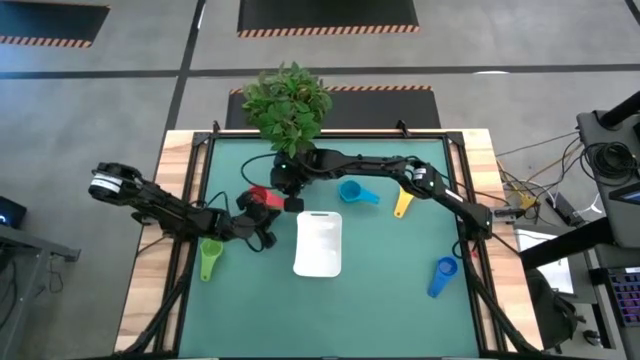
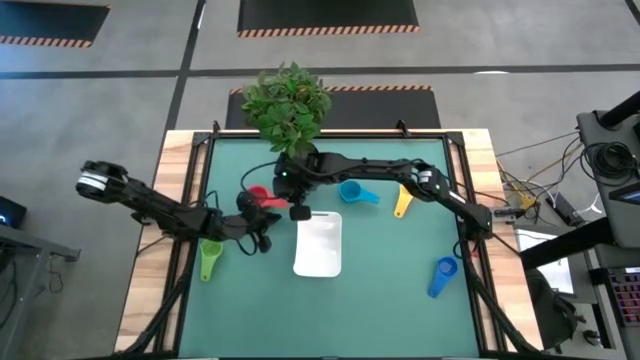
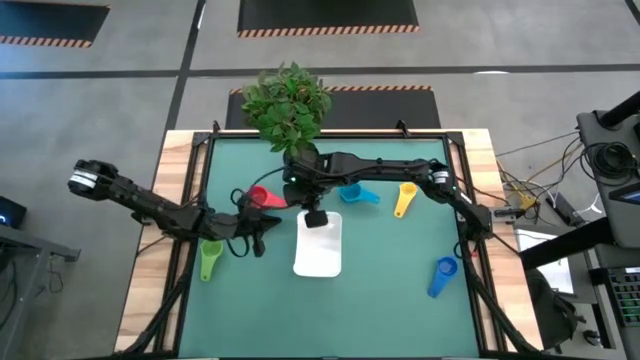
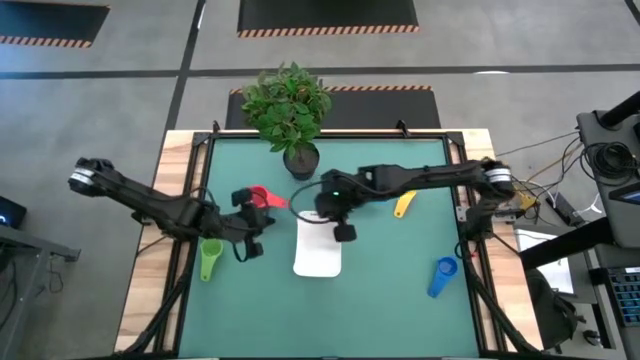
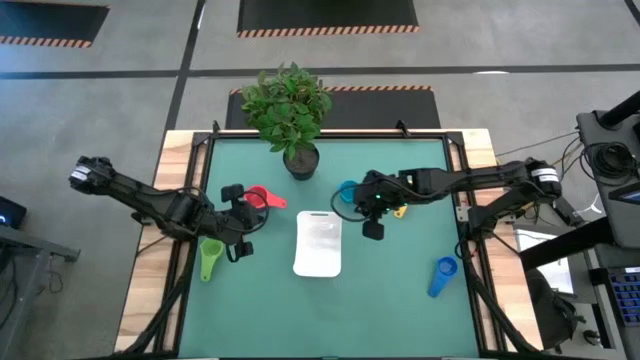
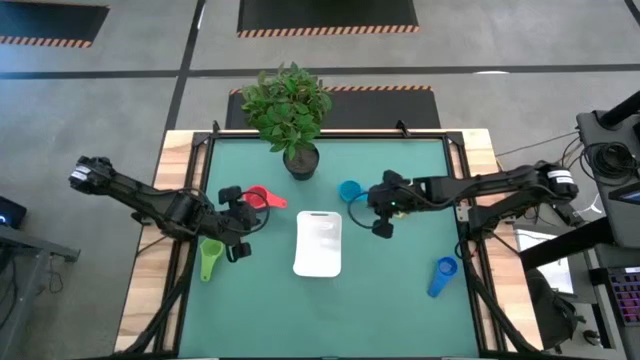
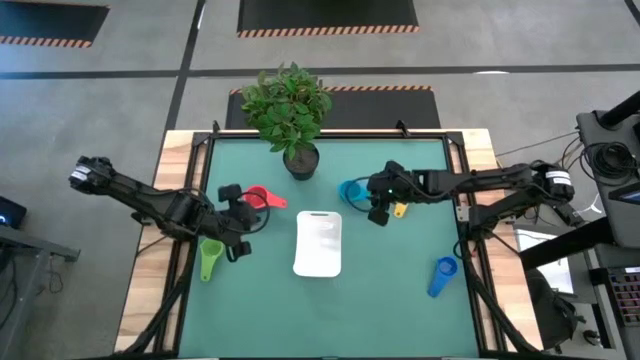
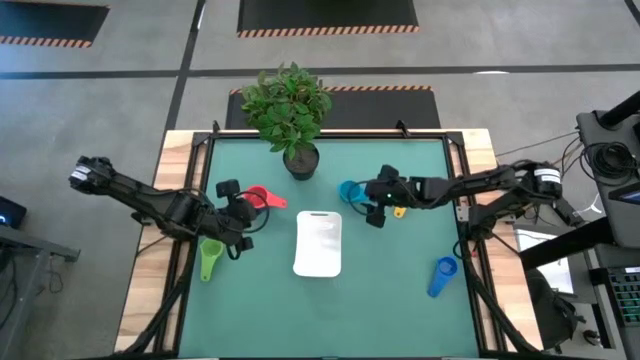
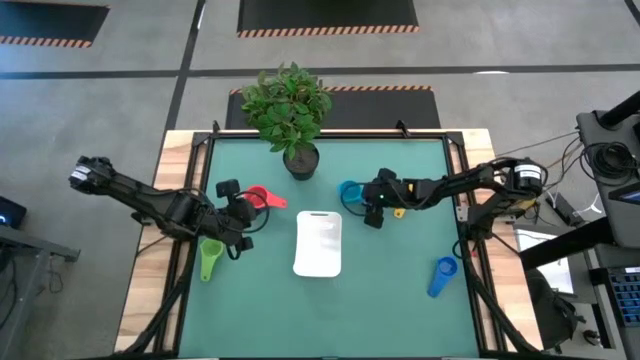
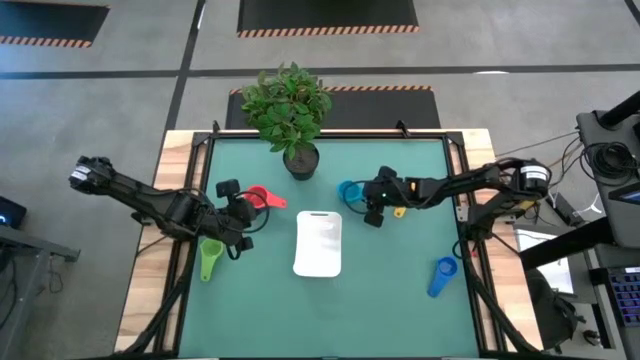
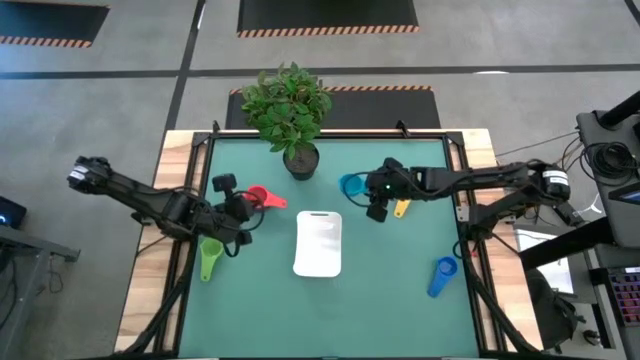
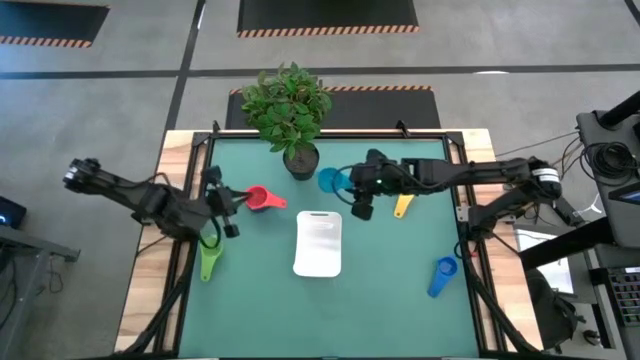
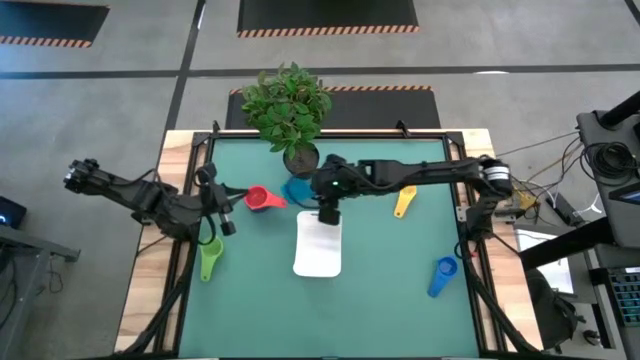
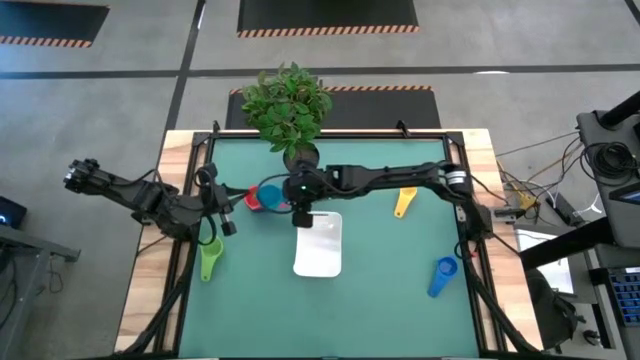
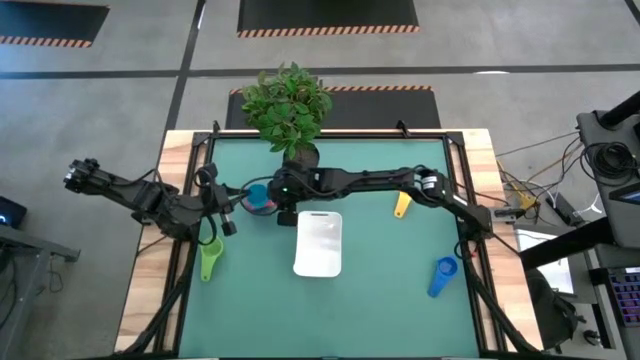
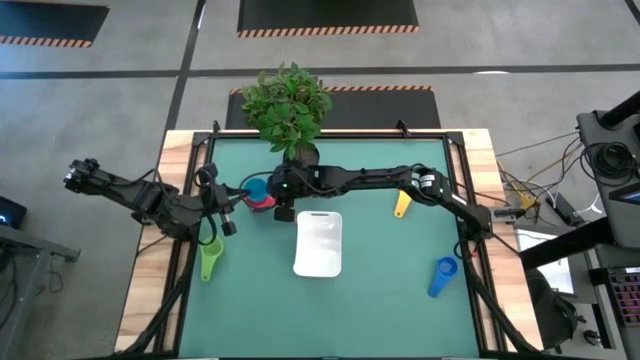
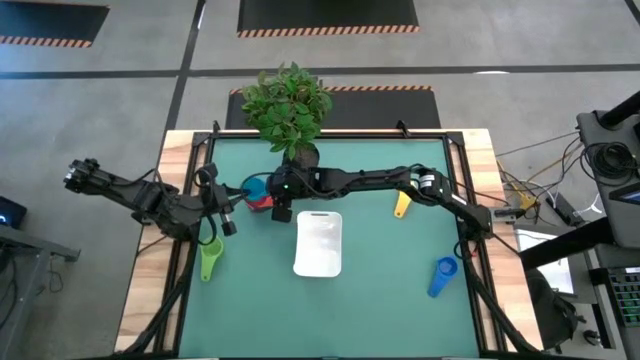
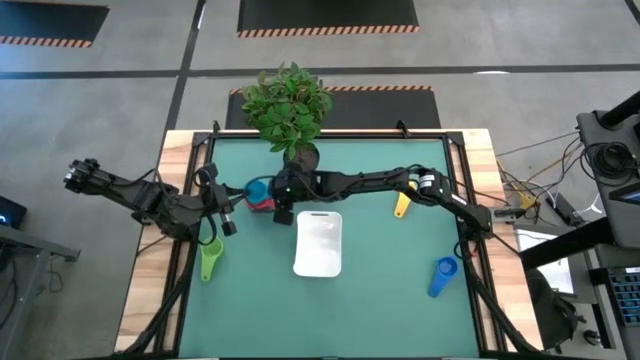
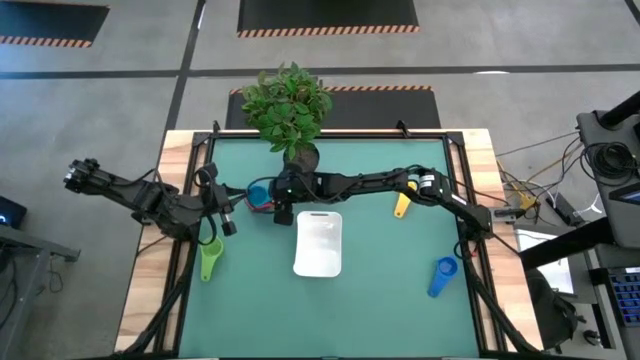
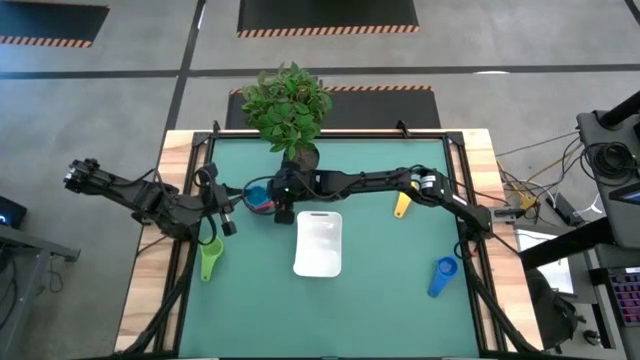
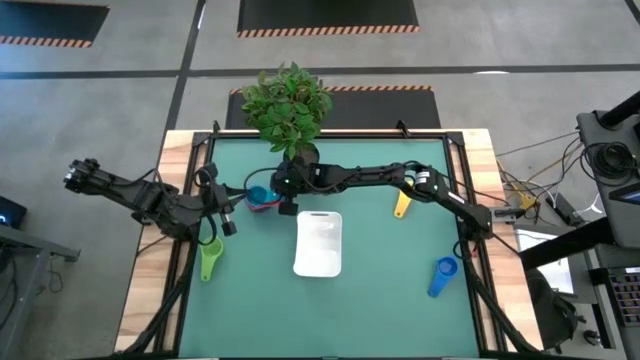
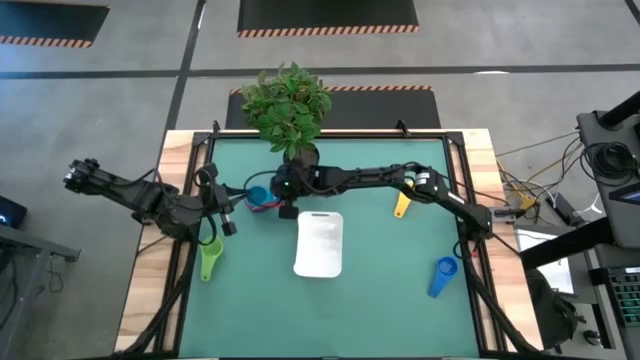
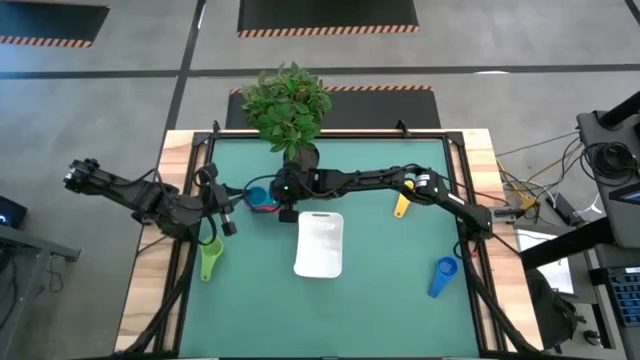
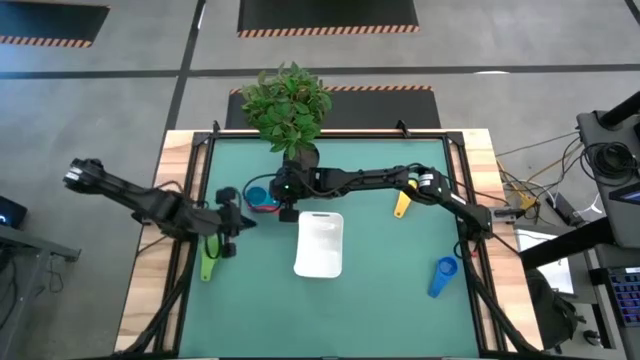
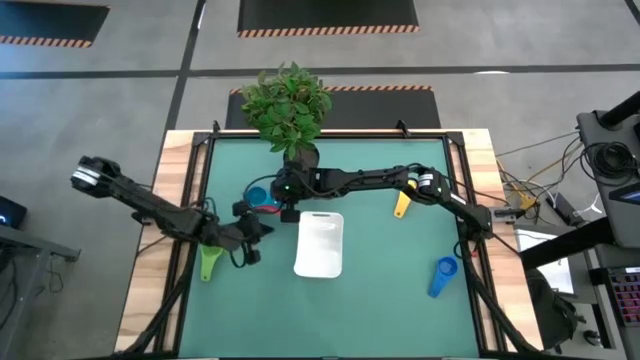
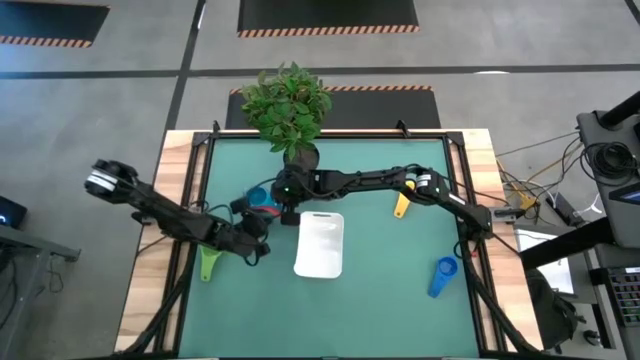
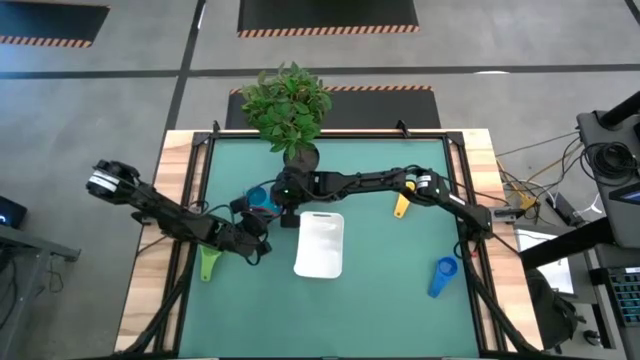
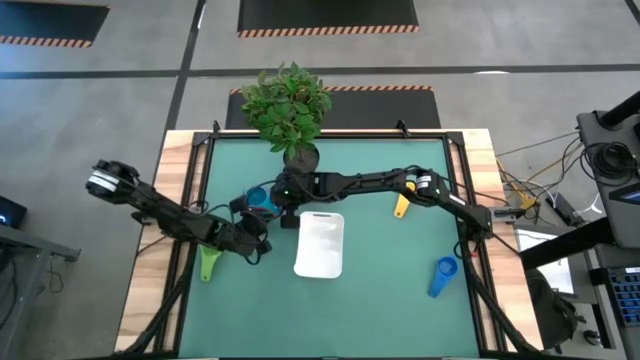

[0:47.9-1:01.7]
Task: Nest measuring cups in basket
Stack the light blue measuring cup on top of the red measuring cup

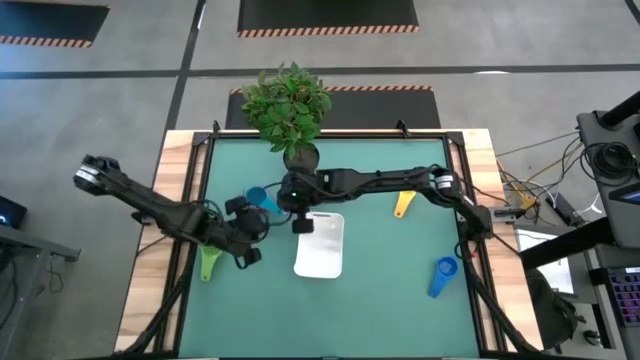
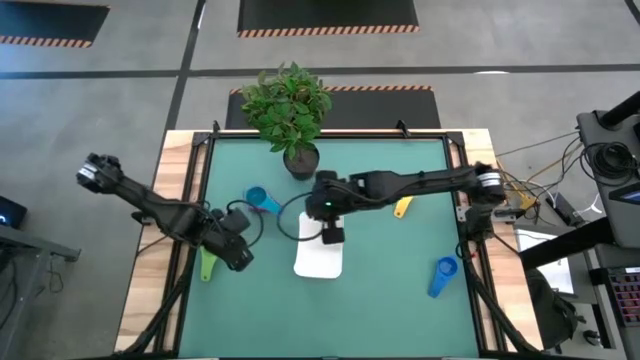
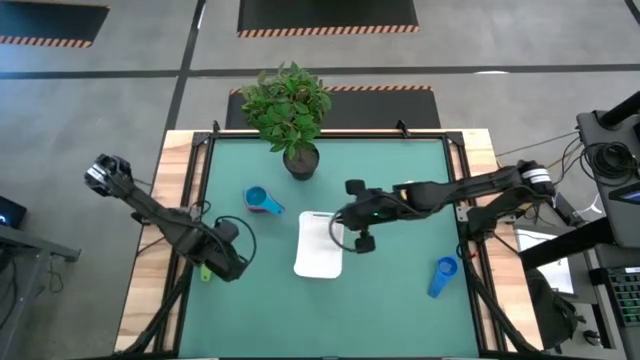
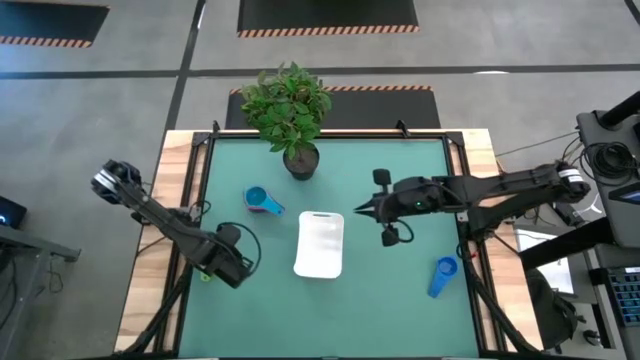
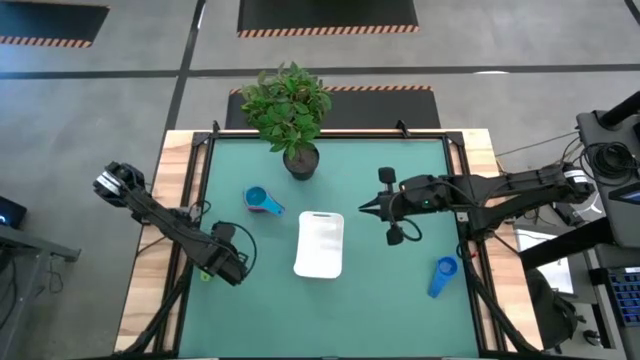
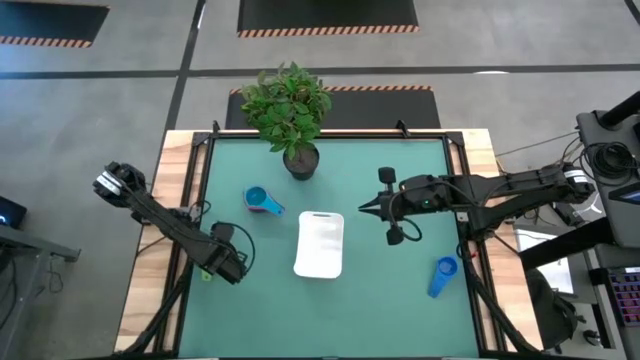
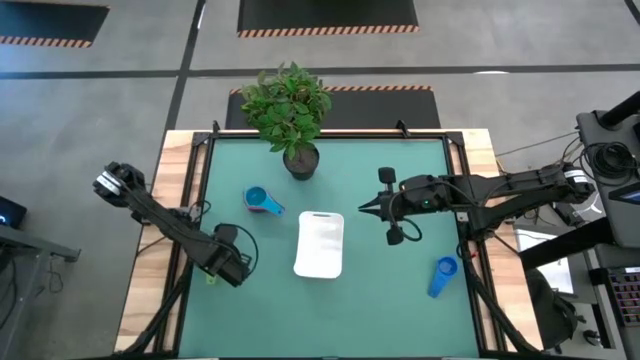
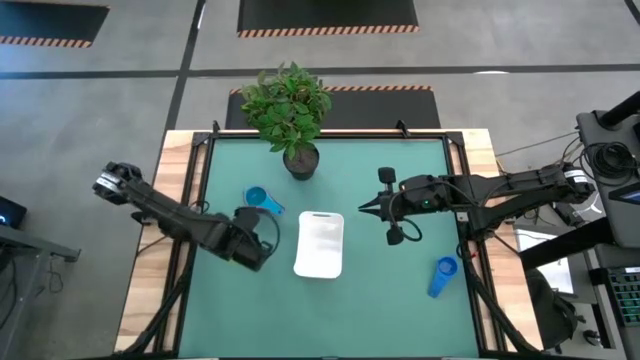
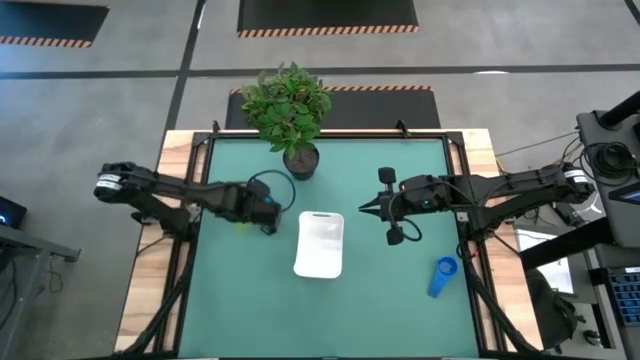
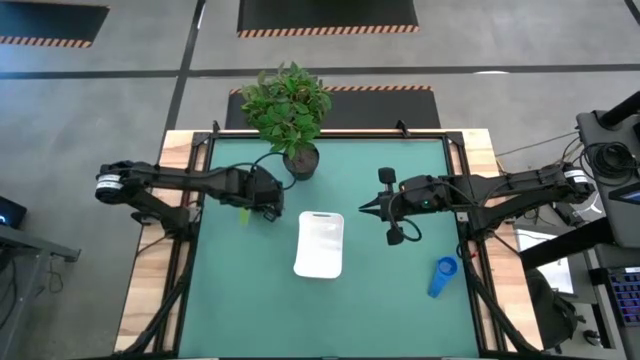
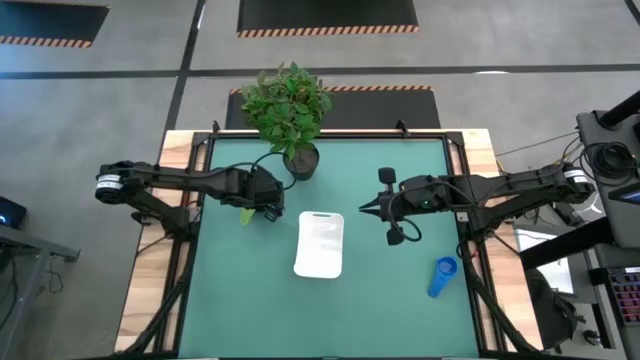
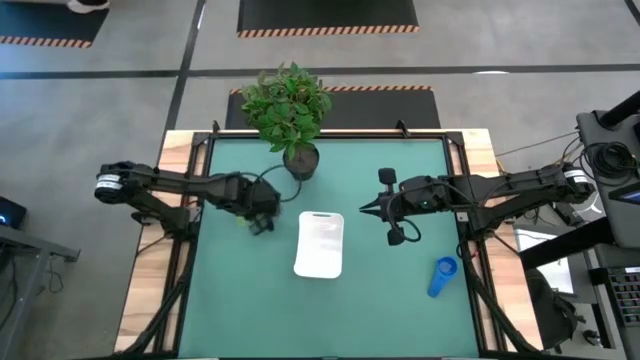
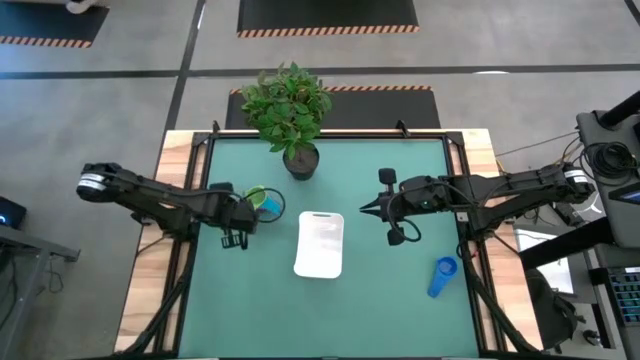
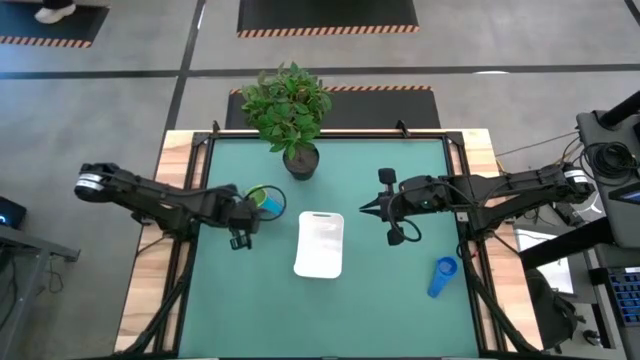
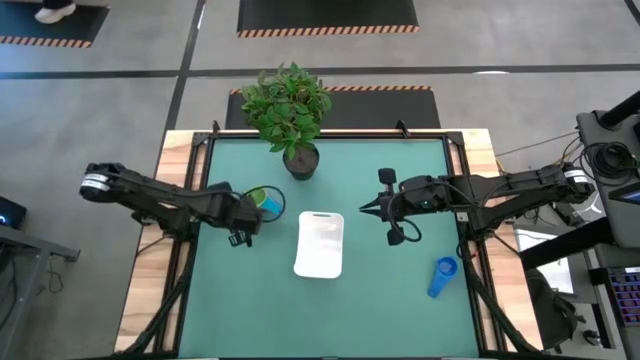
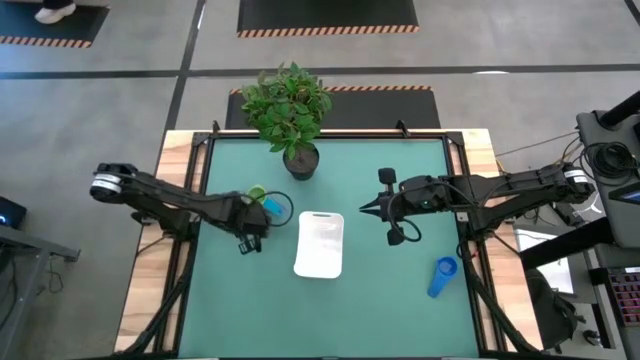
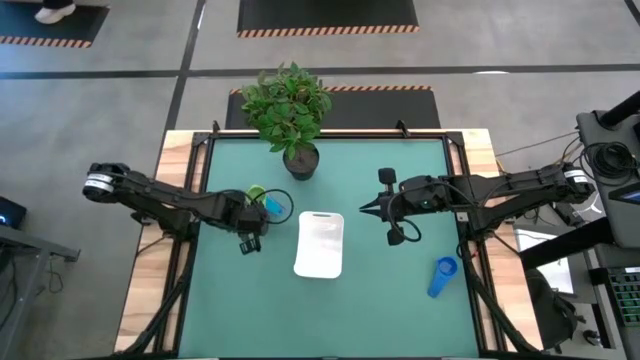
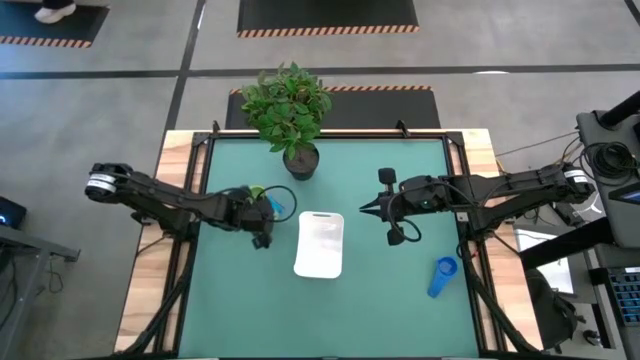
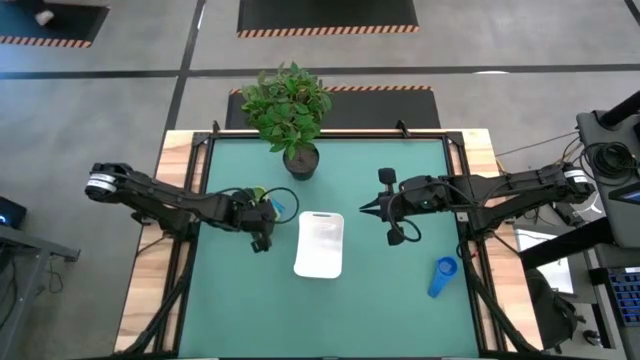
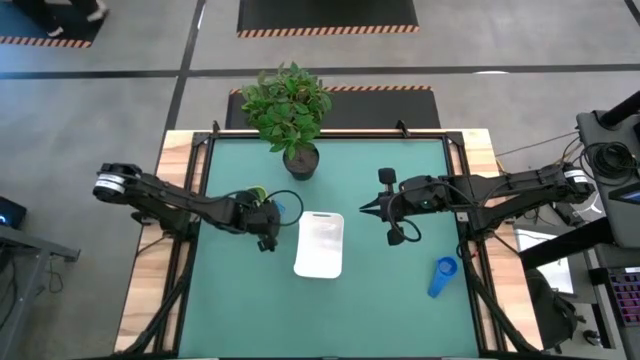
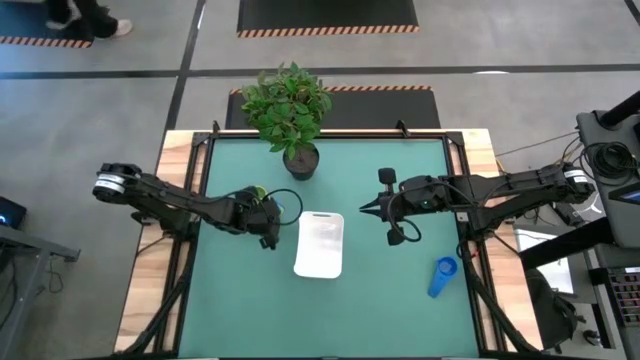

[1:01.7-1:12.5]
Stack the green measuring cup on top of the light blue measuring cup
